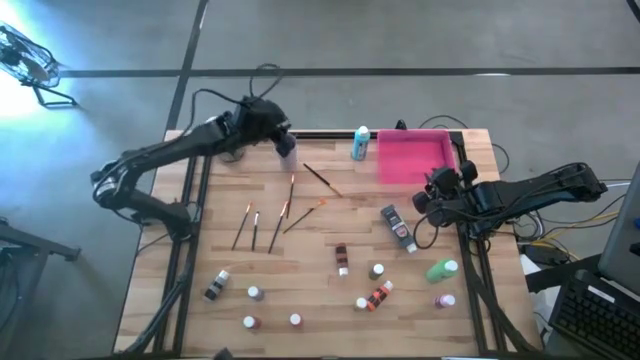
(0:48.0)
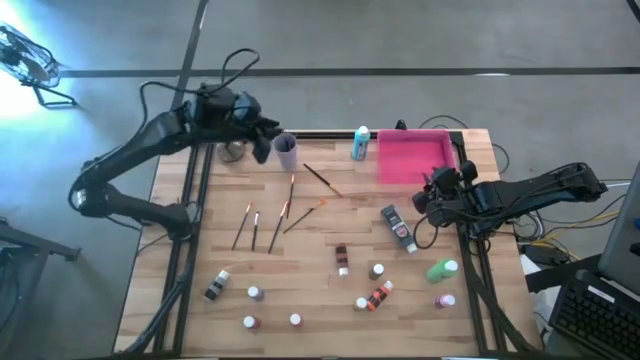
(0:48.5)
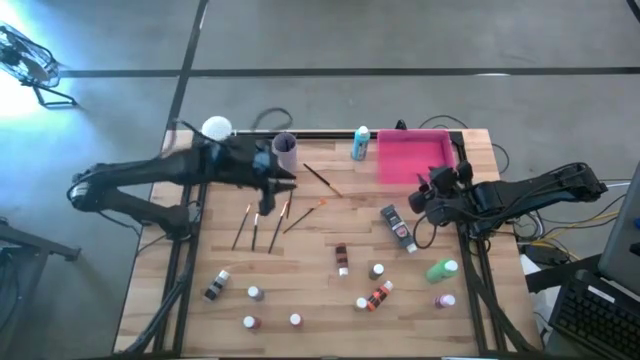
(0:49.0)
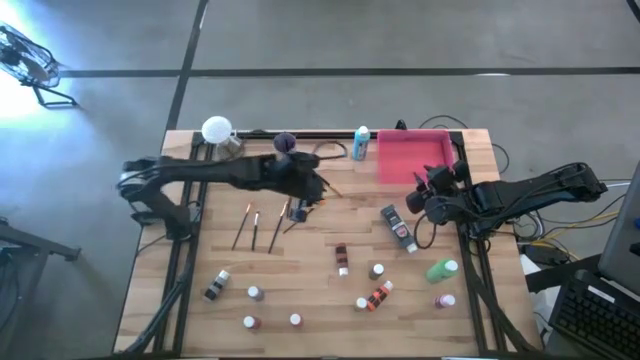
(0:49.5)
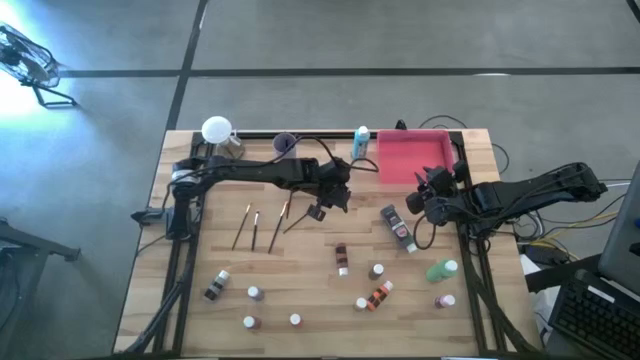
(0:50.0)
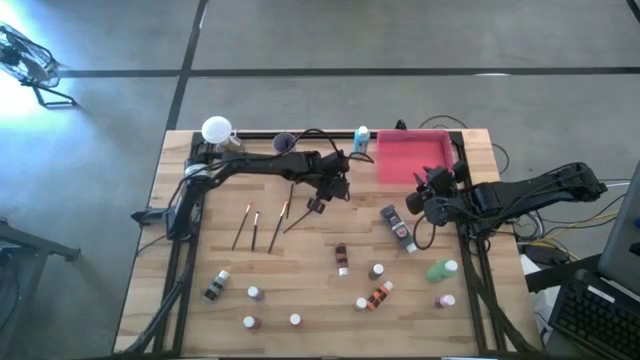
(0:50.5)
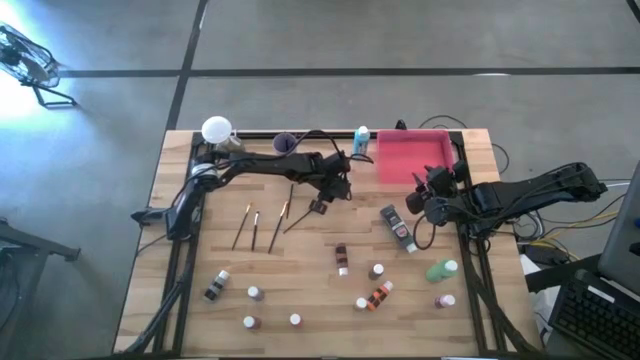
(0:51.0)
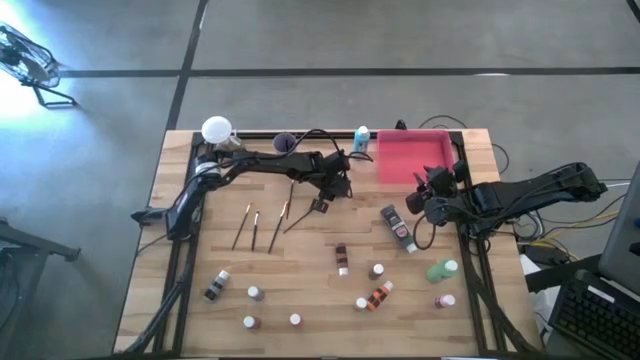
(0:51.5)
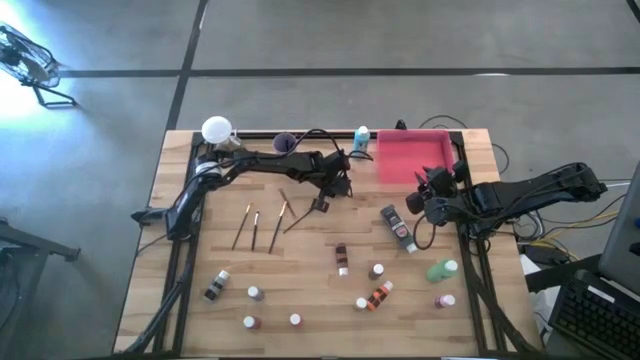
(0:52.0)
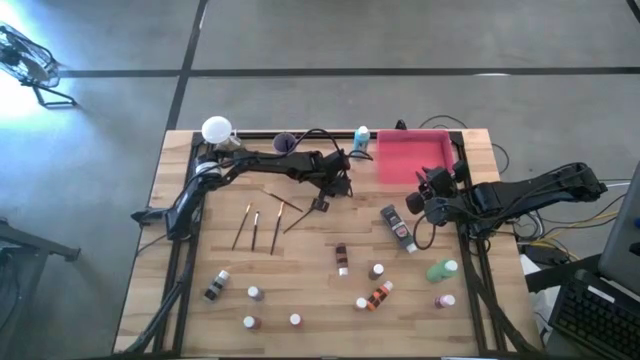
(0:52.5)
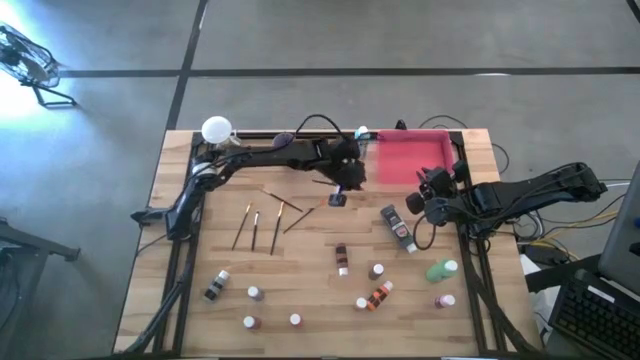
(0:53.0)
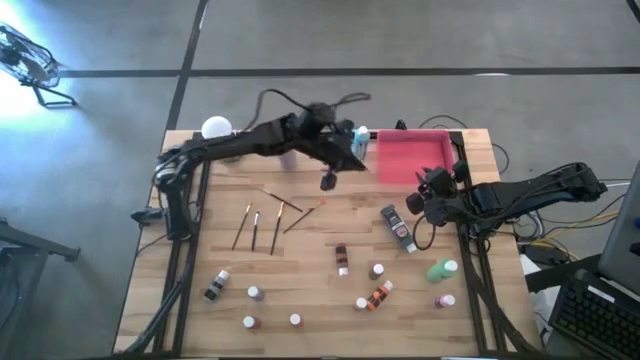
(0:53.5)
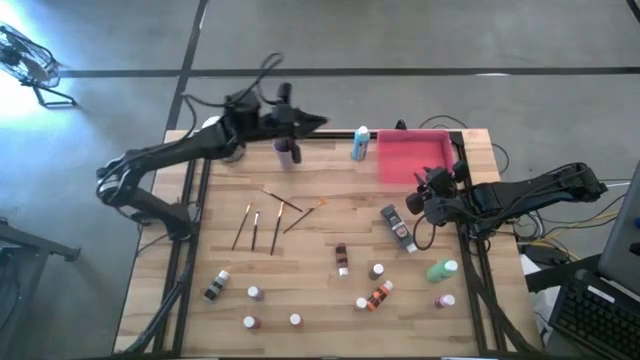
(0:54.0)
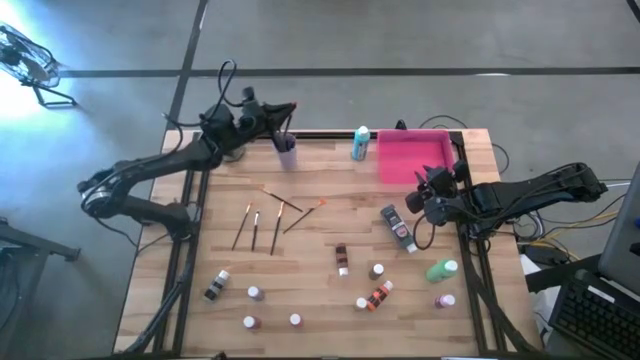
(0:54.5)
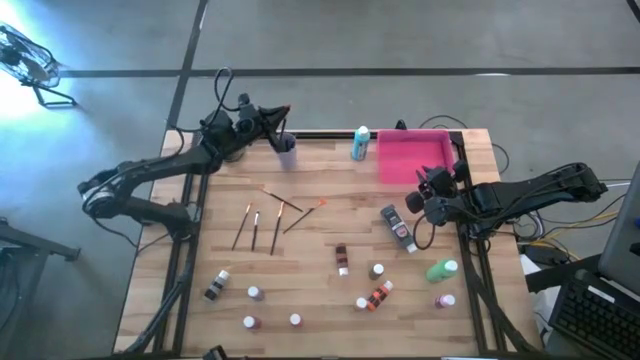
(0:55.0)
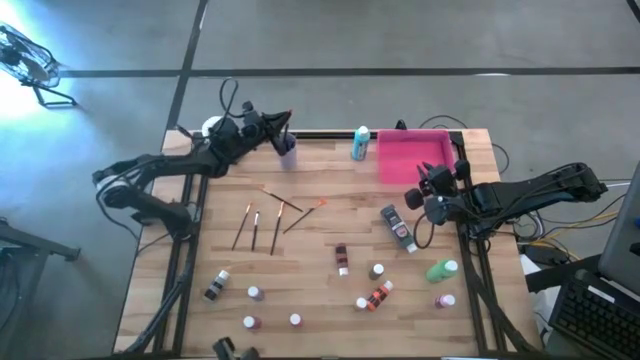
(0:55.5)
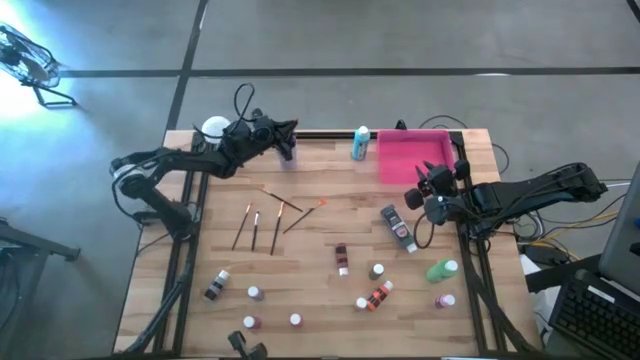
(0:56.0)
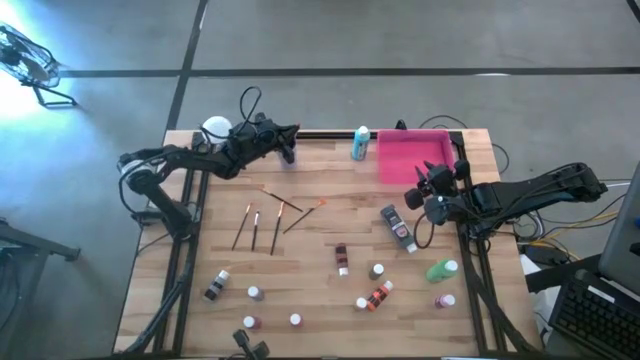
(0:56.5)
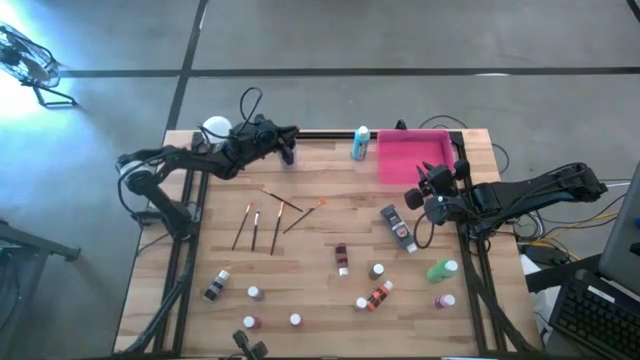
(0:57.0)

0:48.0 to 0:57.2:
Task: Pick & Place Paint Supplies
Put the gold black paint brush into the purple cup

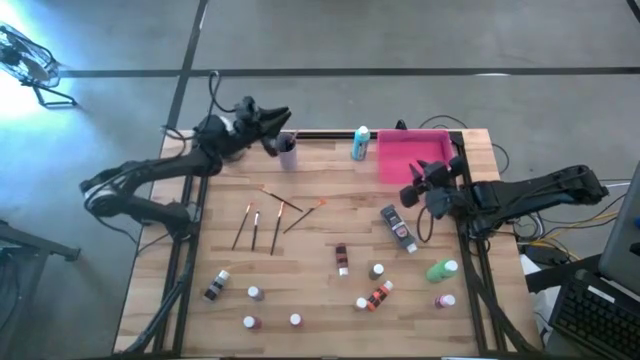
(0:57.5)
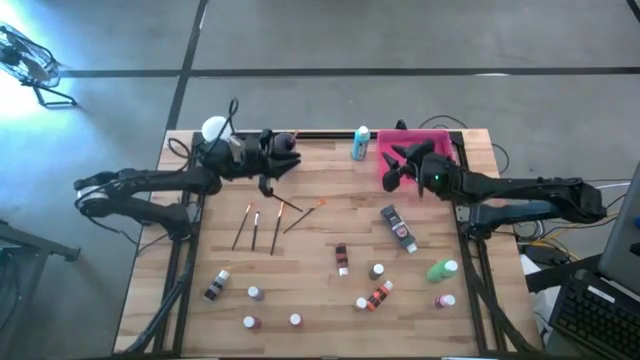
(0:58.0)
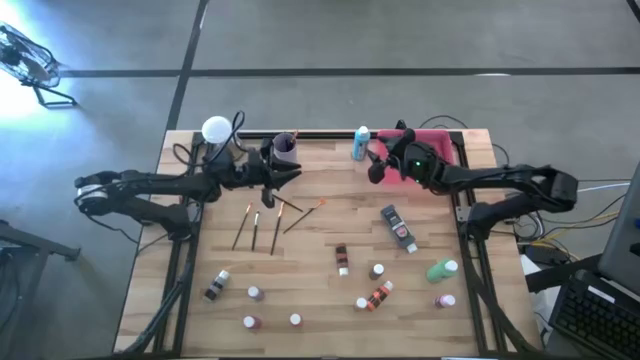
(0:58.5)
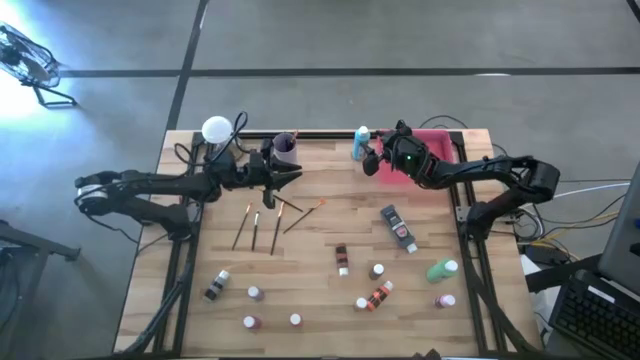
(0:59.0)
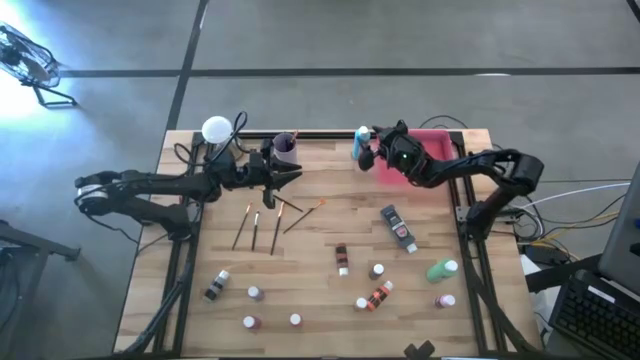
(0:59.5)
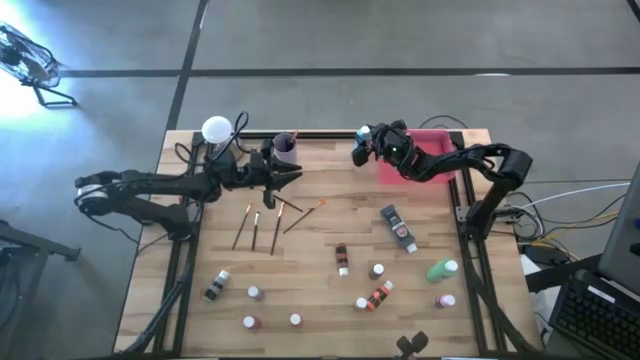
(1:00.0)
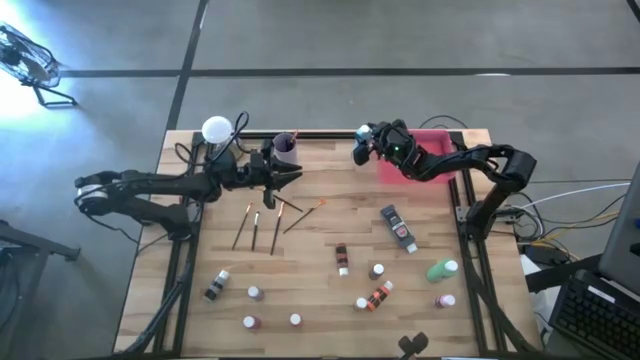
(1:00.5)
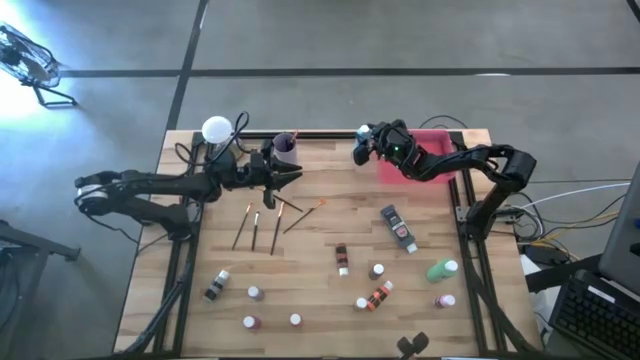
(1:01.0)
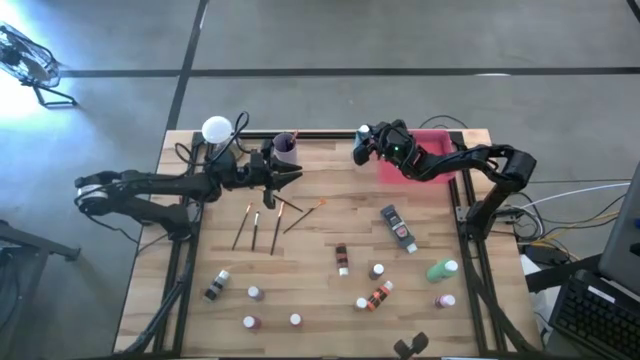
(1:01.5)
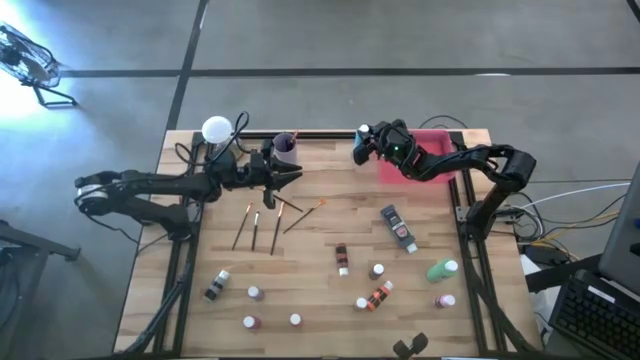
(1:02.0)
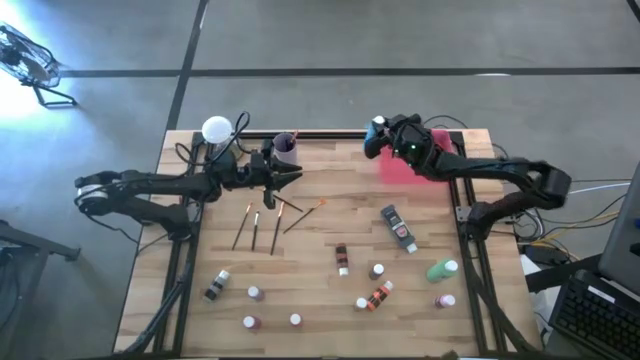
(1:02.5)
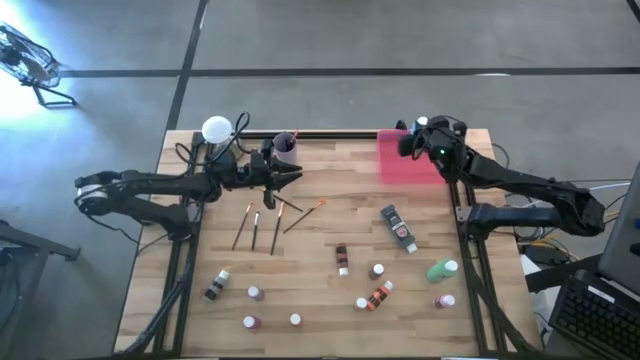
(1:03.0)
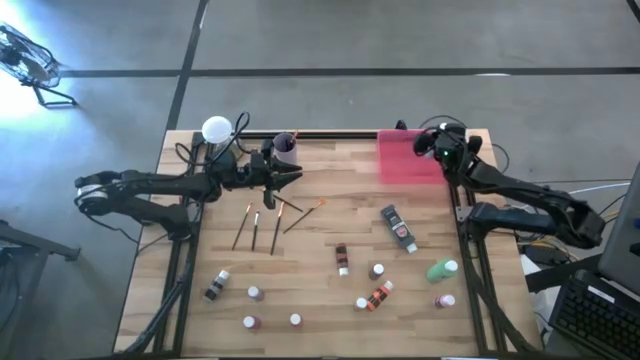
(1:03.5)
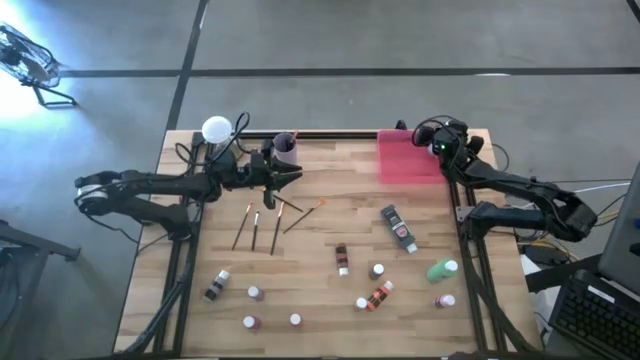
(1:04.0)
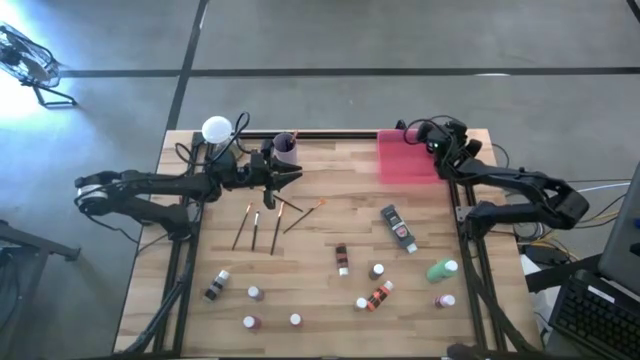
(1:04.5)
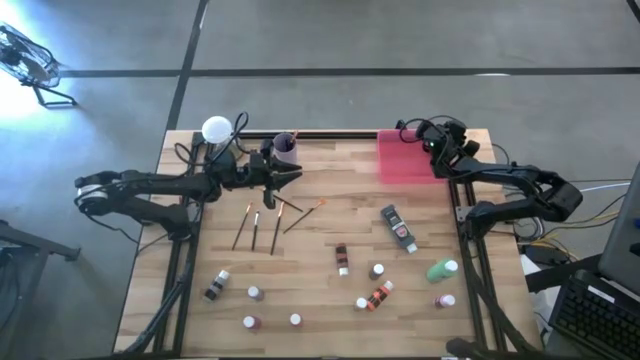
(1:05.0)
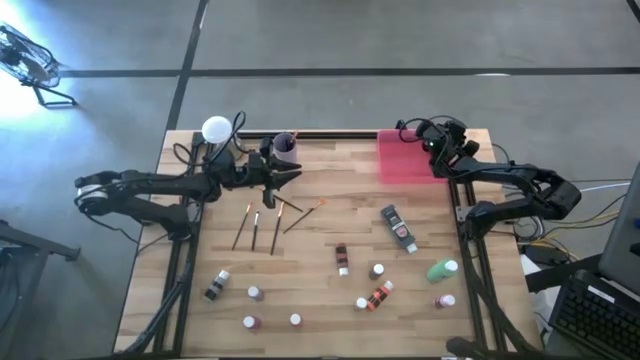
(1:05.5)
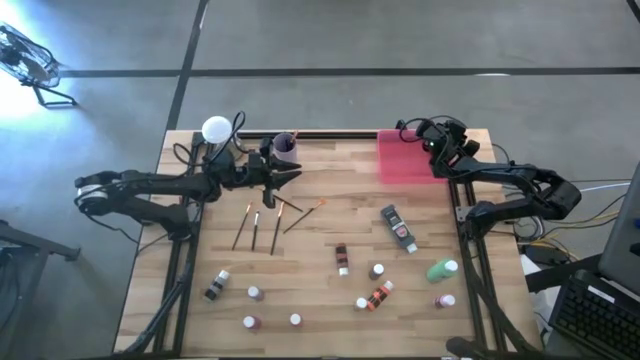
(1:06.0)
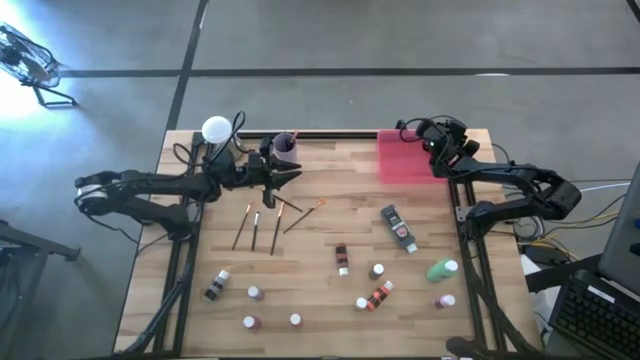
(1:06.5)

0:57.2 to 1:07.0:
Put the large blue paint bottle into the pink bin

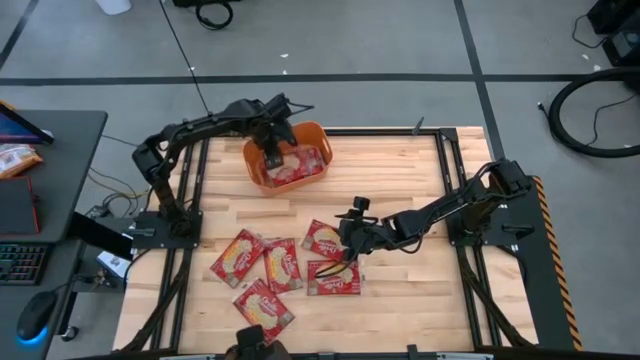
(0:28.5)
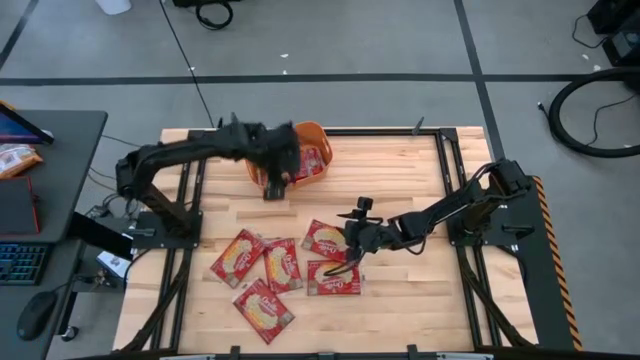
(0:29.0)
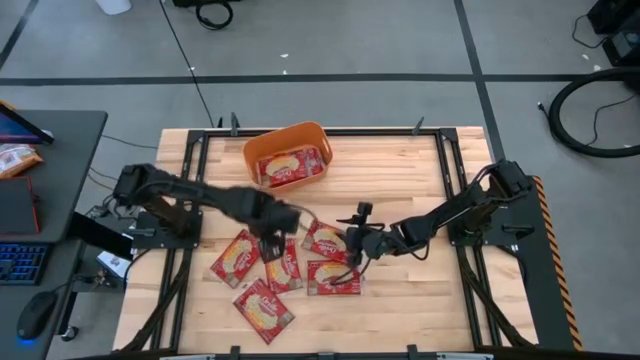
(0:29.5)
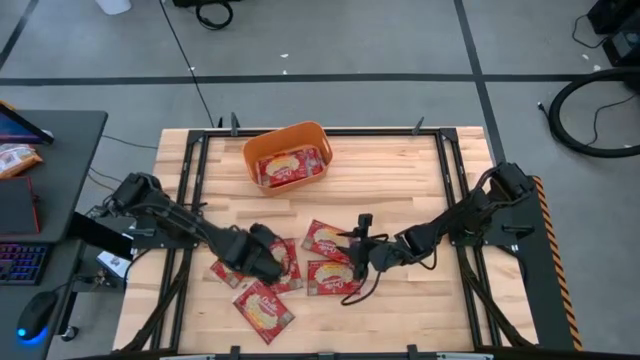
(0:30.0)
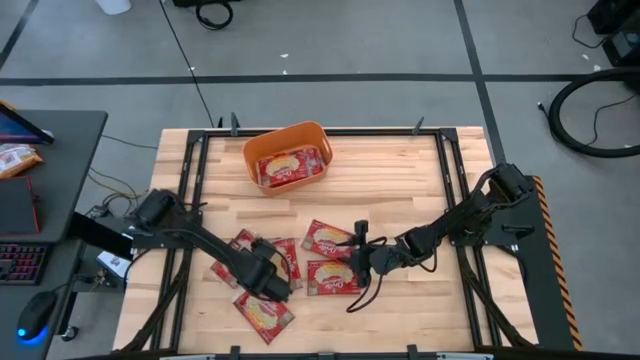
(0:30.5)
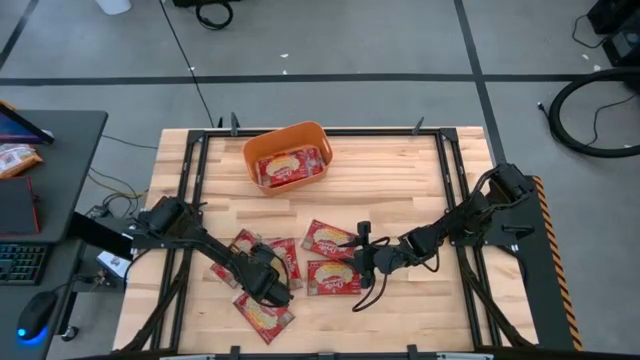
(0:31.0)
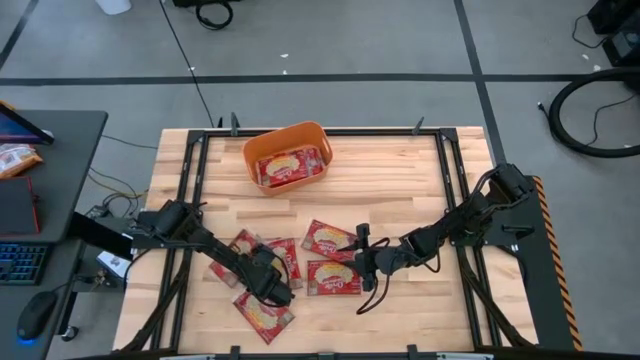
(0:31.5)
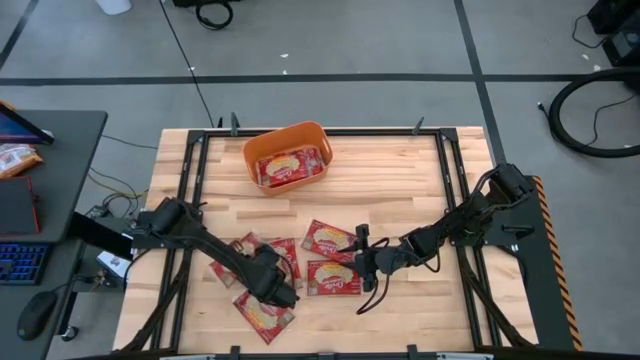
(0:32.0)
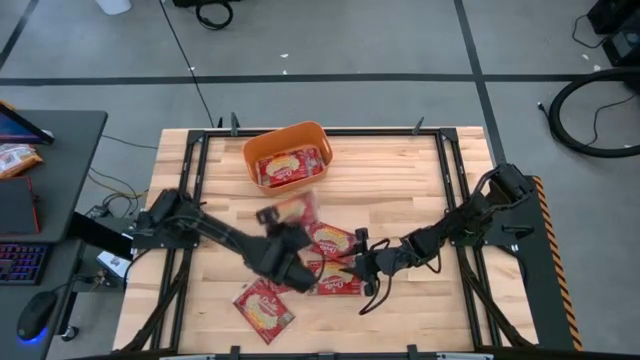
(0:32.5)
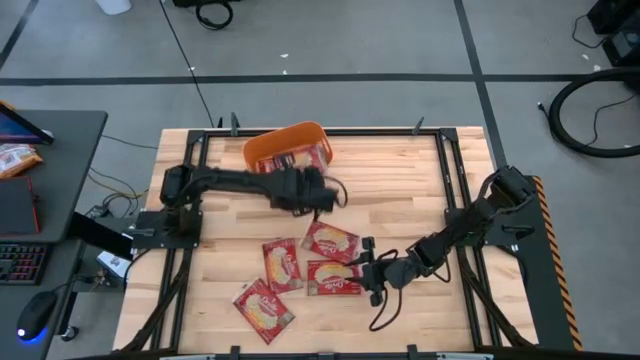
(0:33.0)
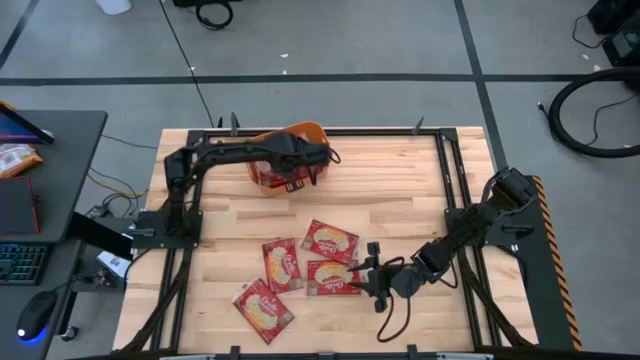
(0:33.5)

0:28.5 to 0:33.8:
Task: Sort popcorn bags into baskets
Put the red popcorn bag into the orange bin
